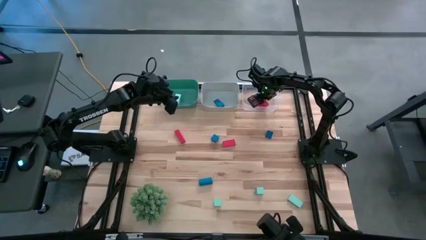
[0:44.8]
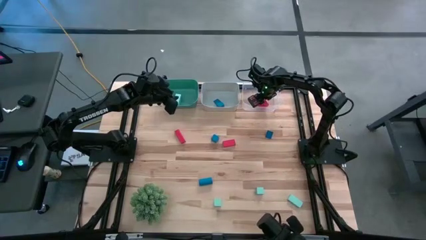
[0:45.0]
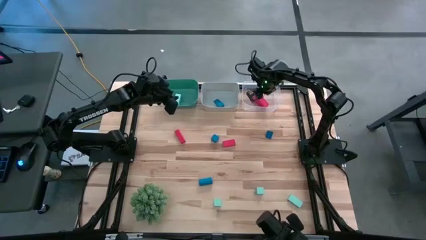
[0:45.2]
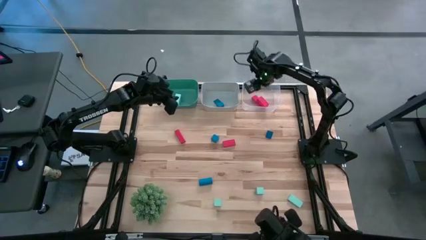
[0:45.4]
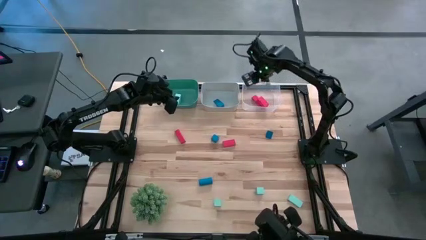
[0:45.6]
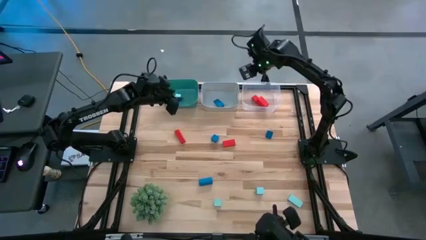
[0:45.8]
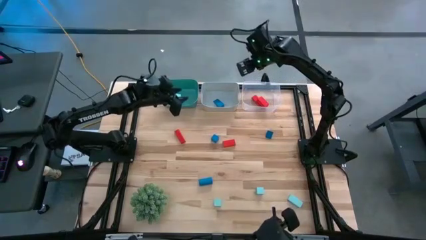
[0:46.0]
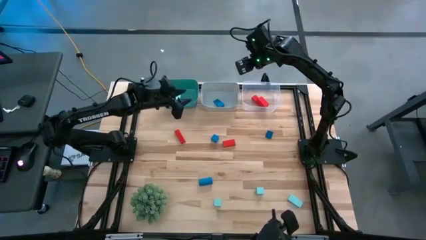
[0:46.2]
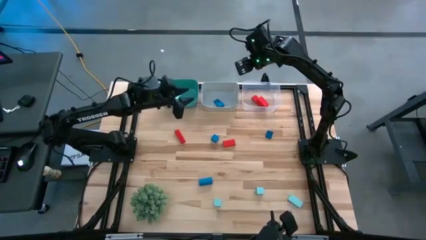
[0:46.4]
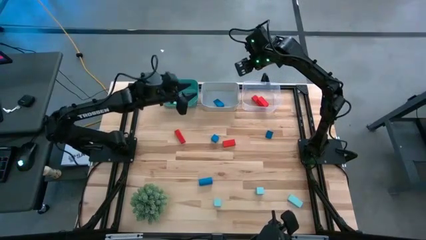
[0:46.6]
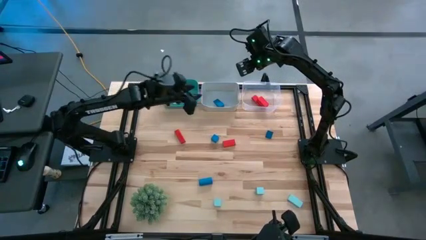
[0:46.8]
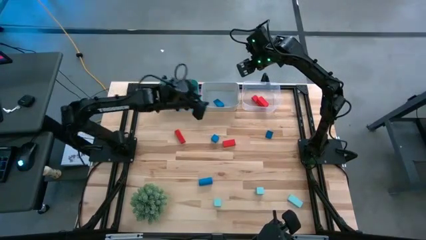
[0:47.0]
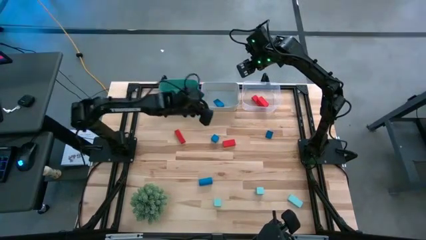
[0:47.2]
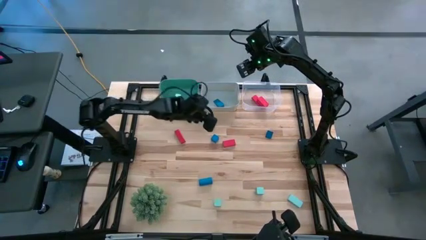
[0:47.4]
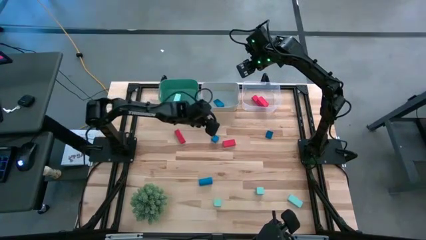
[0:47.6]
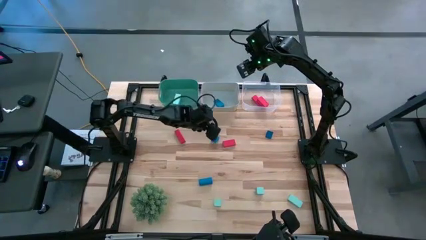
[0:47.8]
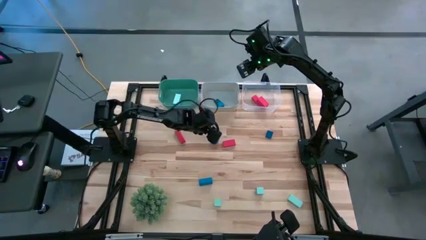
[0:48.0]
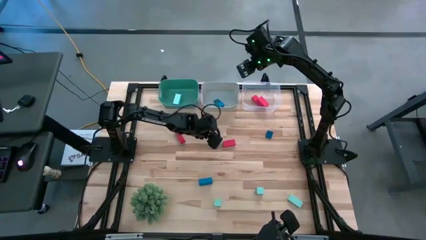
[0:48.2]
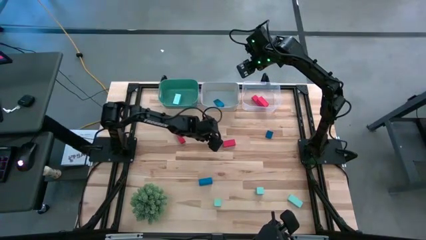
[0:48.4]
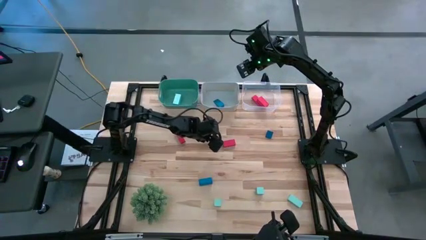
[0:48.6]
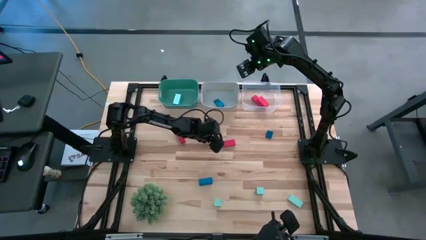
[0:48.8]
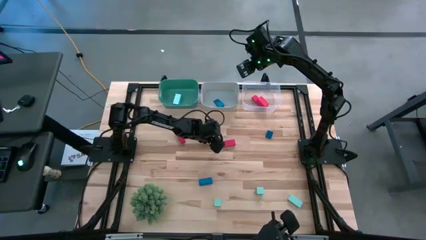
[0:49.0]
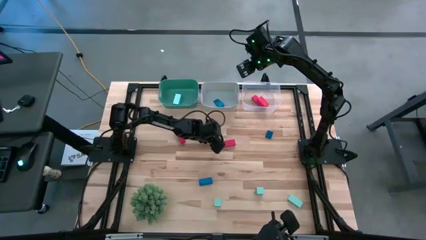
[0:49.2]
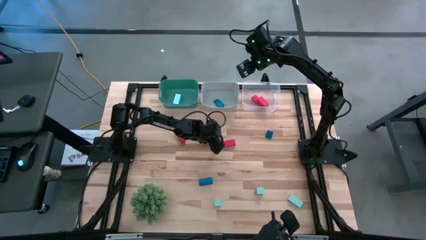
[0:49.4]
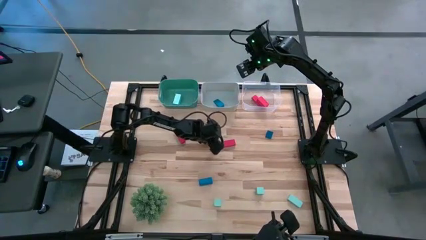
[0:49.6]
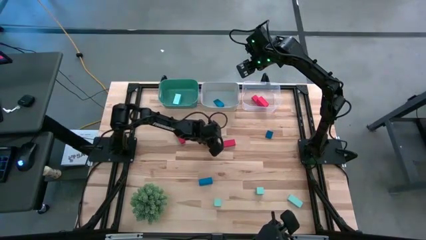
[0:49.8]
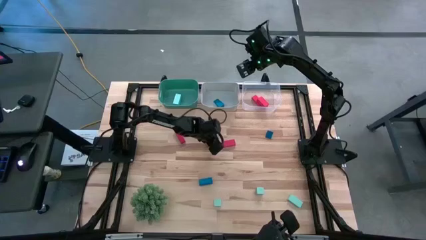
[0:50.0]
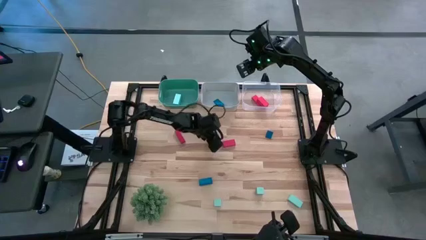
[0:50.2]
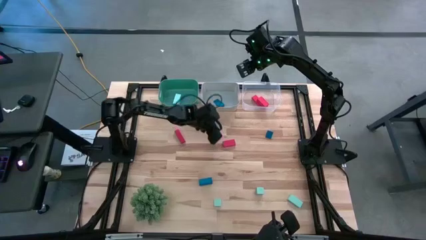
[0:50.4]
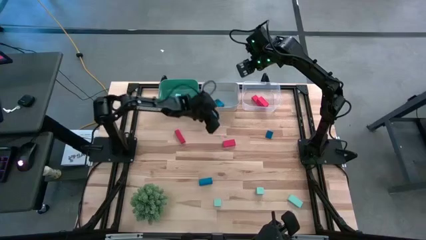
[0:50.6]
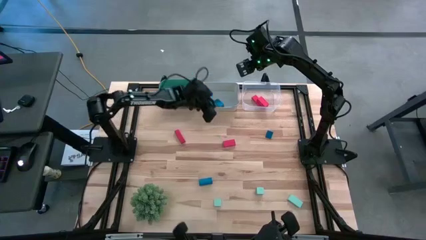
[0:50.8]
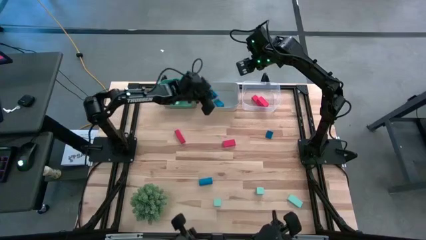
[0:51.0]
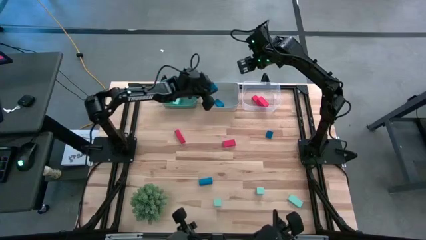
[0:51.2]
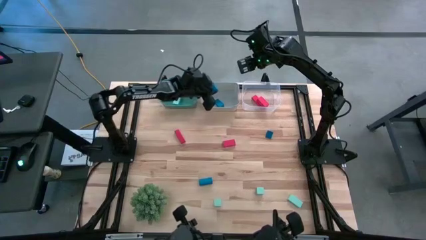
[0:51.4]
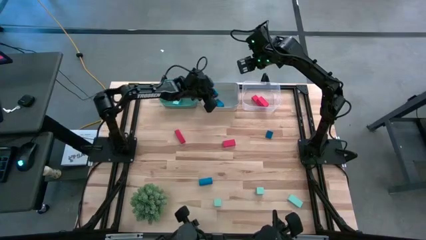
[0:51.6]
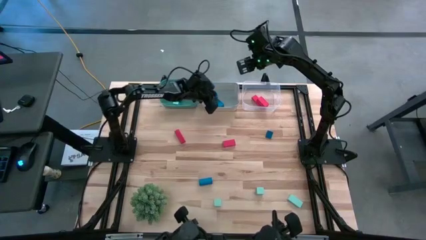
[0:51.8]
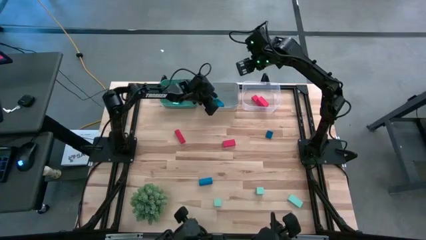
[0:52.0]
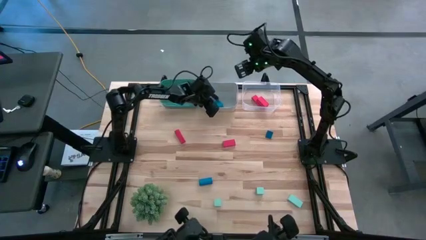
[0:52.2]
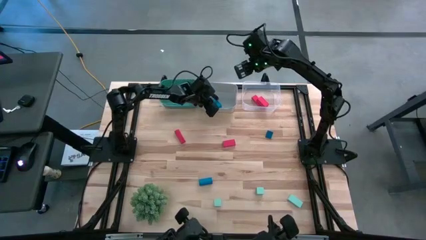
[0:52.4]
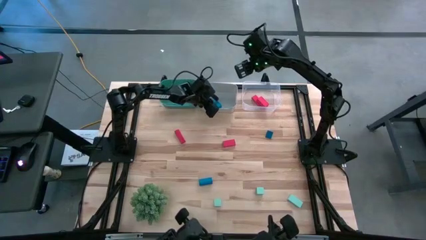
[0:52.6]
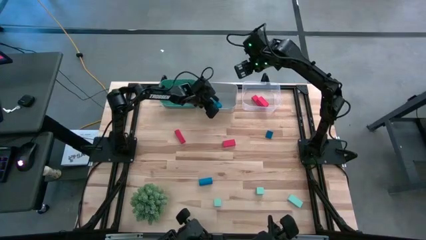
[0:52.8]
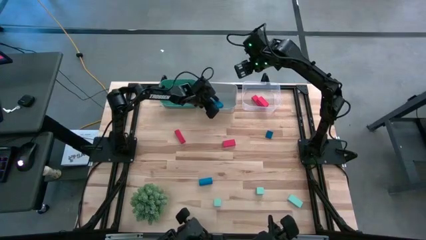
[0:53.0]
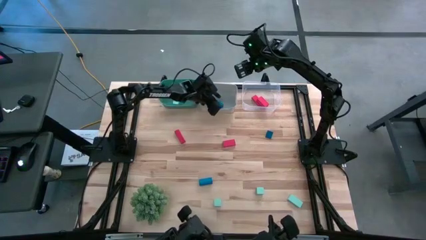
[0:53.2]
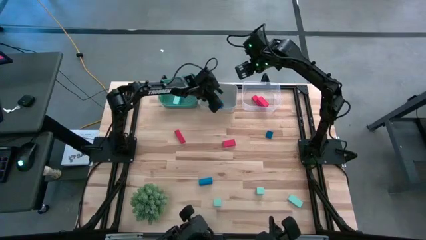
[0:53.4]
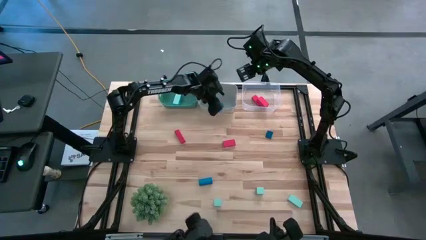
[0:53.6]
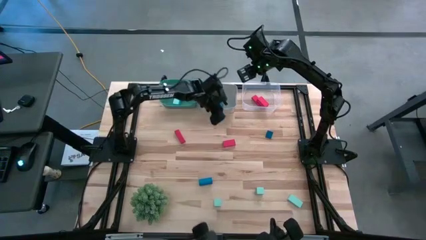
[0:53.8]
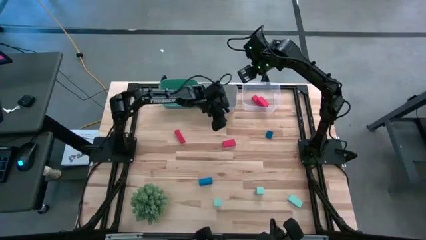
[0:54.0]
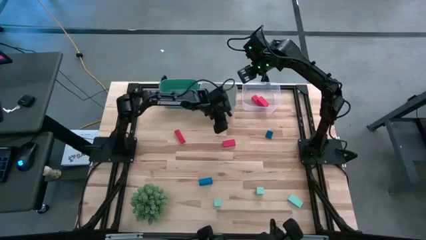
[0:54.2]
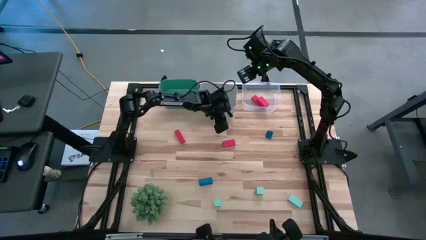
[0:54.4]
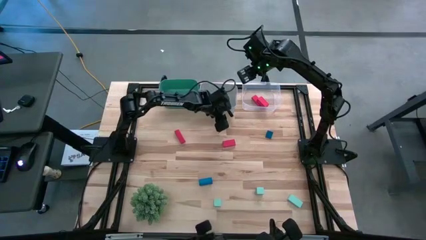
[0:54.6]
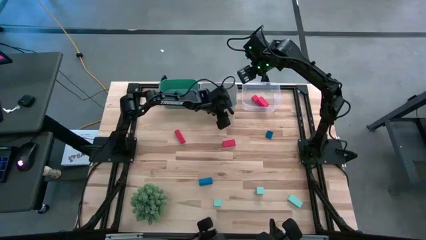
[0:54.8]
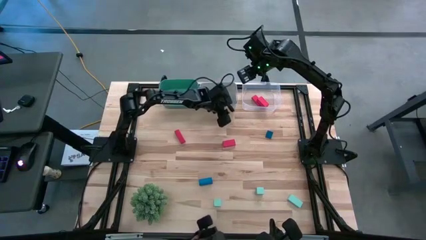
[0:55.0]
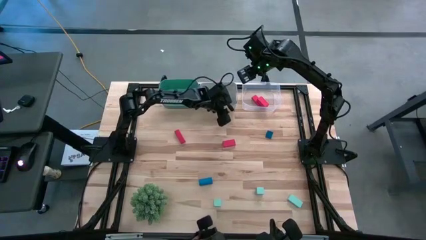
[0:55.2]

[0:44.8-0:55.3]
Task: Sort & place blocks by color
Put the blue block into the gray bin

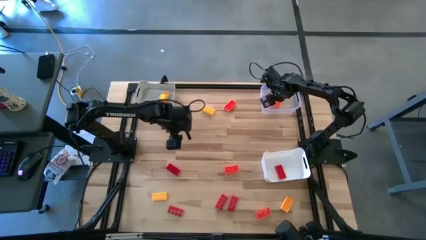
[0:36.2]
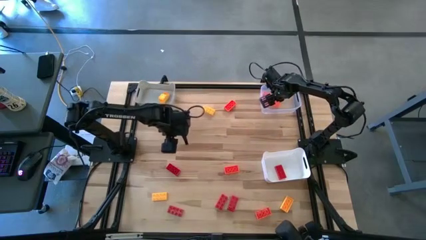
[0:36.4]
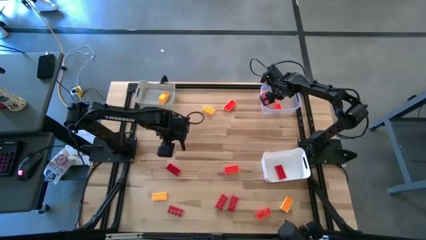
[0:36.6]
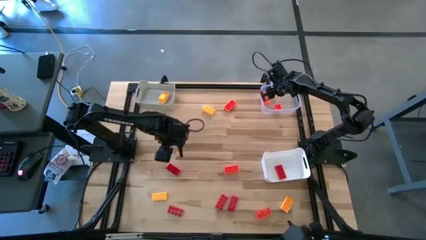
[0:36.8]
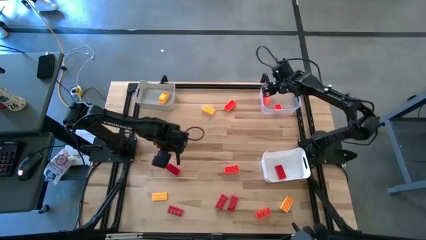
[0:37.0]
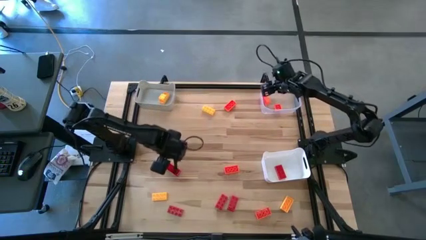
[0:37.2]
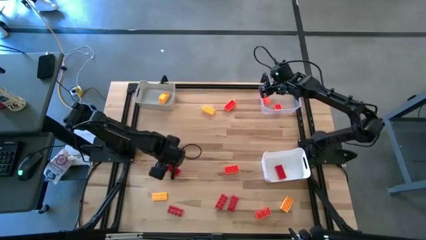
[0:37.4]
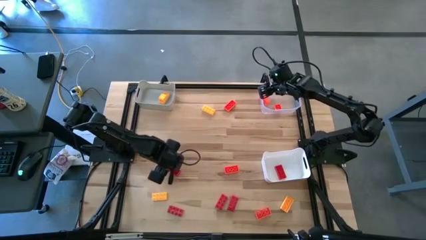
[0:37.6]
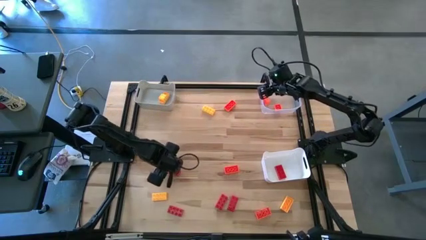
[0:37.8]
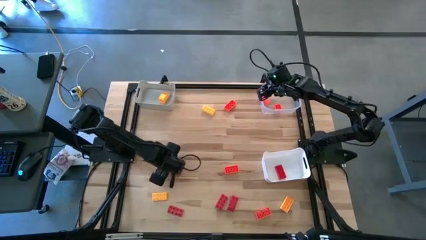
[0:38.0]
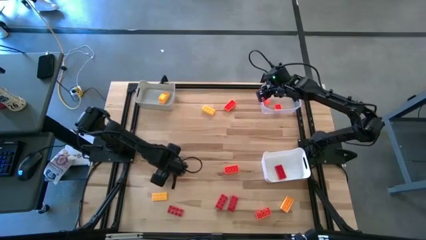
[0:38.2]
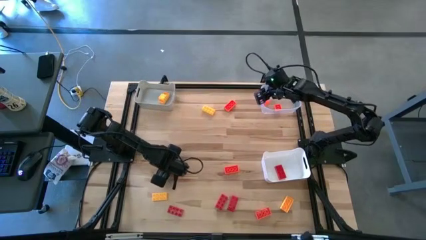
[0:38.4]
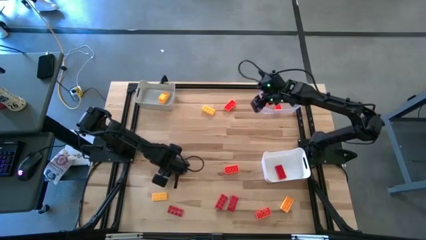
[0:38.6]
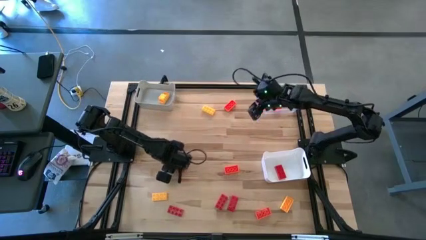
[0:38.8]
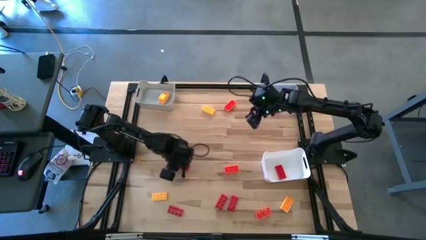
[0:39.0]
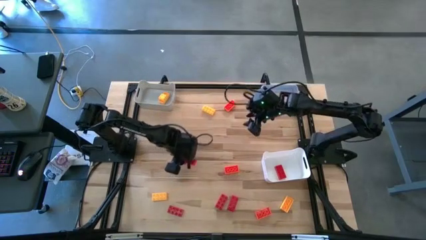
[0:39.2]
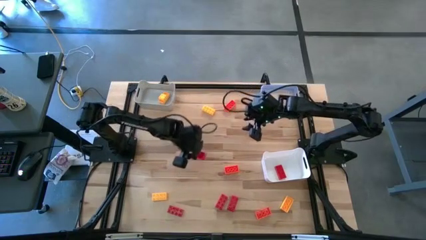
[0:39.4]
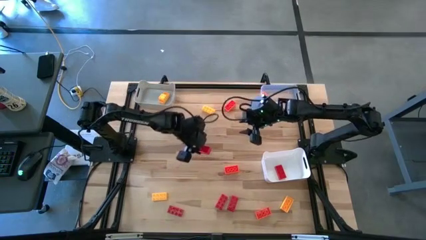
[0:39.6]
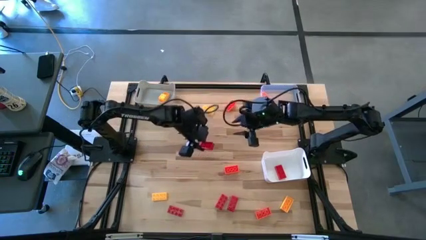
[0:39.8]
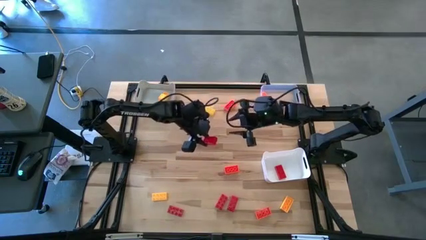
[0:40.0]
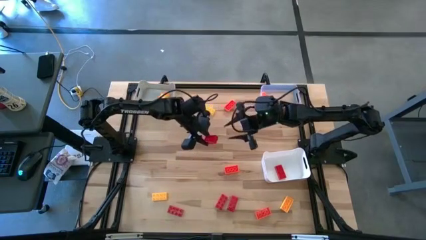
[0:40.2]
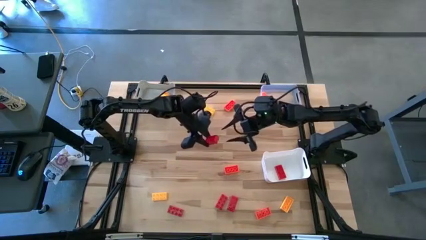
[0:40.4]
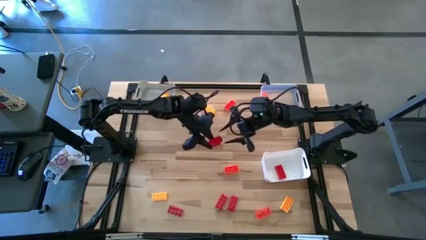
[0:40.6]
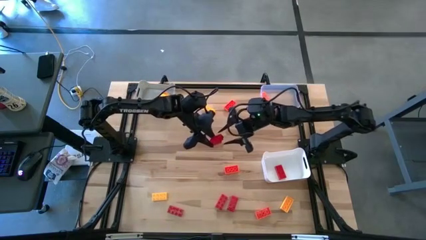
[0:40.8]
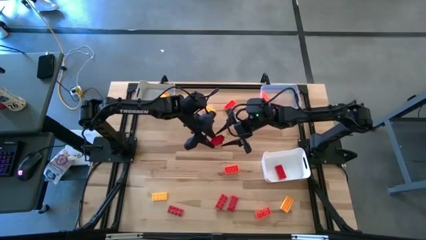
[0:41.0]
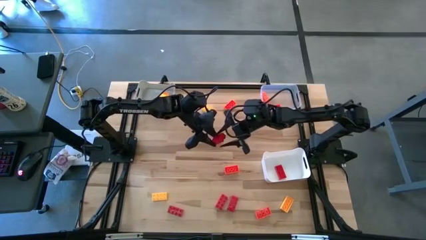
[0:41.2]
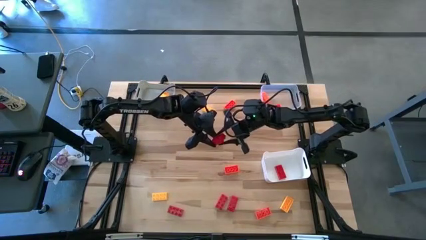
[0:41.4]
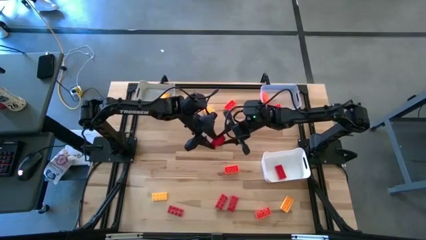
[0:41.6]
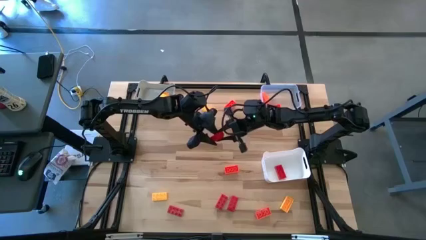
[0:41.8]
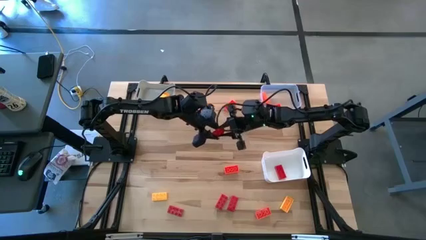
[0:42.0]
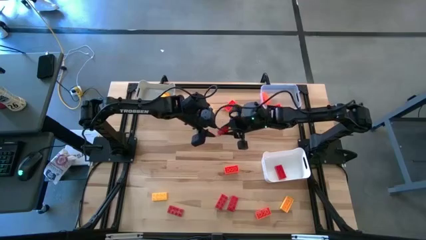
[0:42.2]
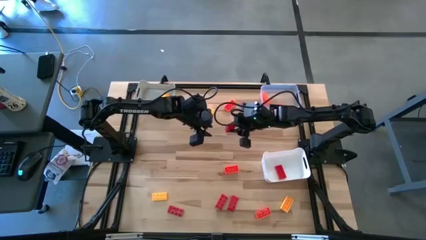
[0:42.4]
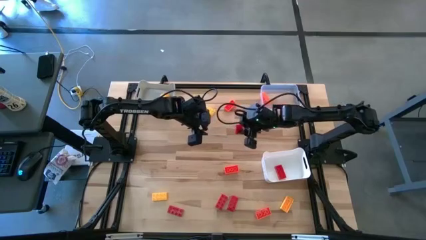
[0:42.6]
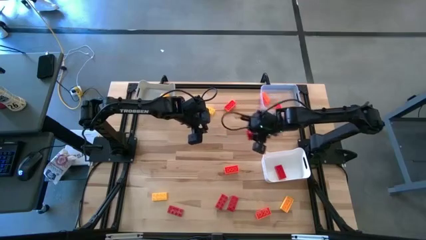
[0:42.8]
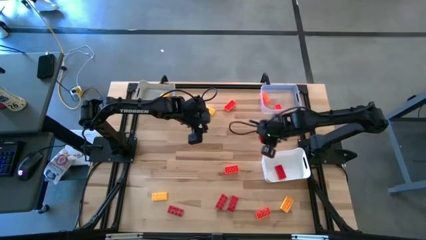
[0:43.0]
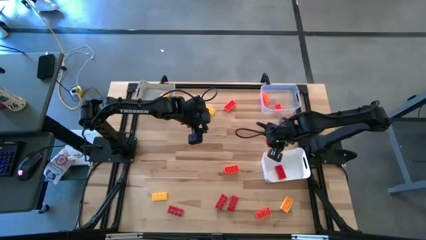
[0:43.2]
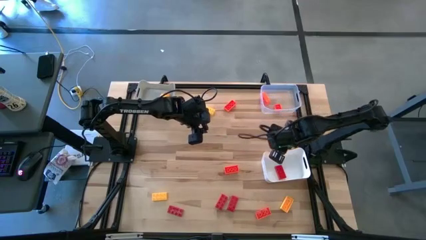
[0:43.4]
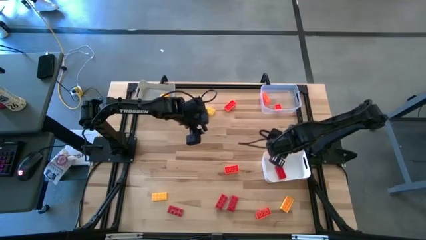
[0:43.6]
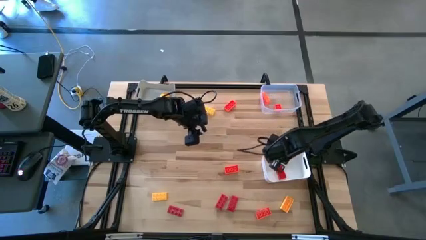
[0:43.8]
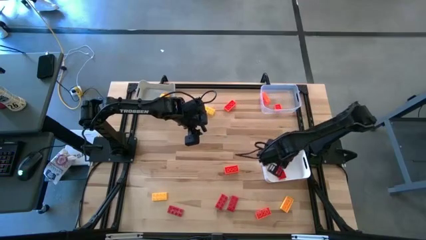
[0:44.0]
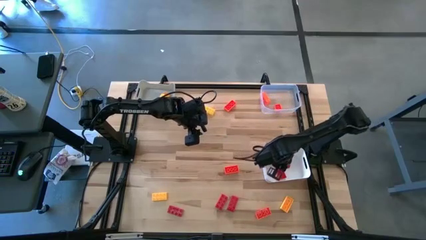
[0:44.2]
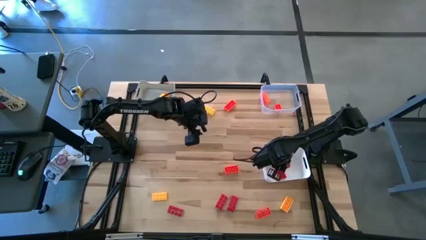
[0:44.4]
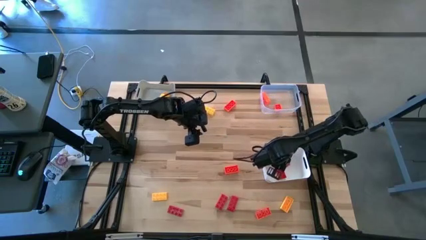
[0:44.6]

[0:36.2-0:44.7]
Task: Sort & place blocks by color
Put the red block into the white bin
